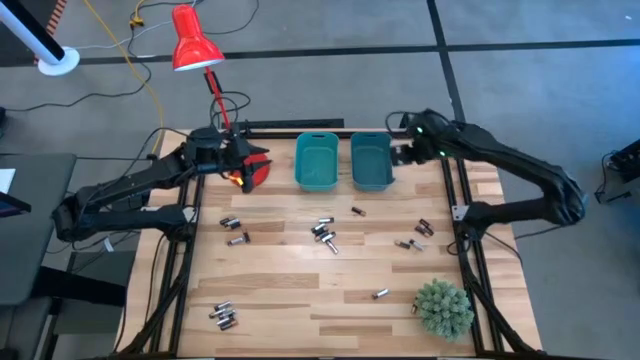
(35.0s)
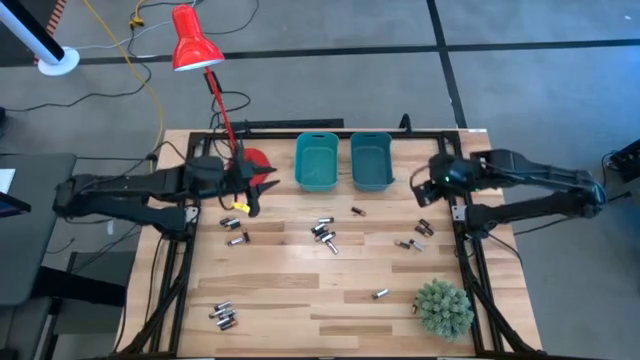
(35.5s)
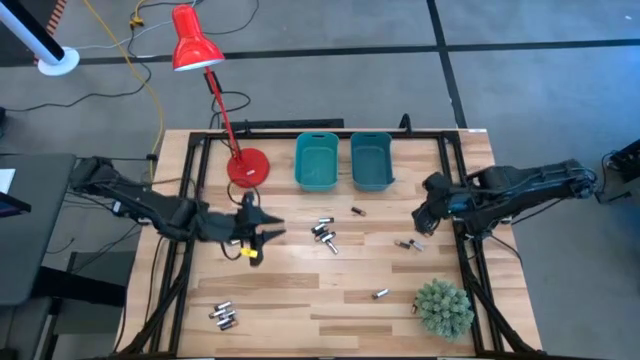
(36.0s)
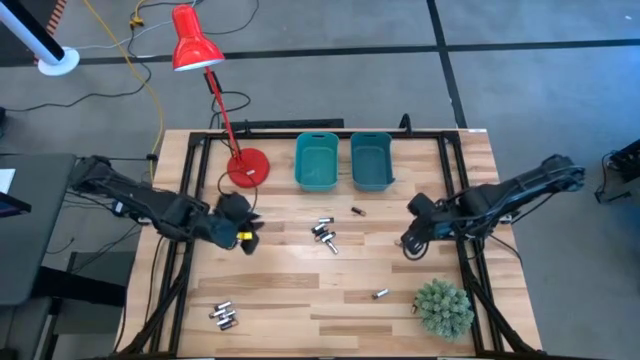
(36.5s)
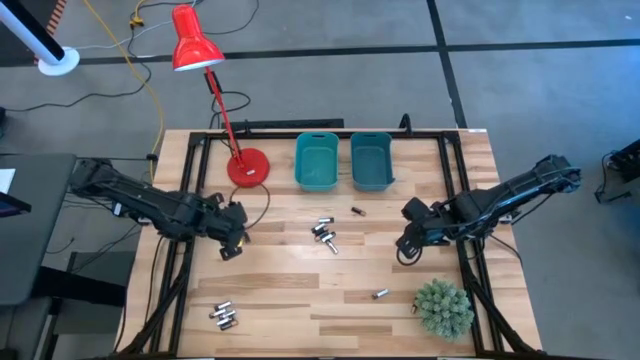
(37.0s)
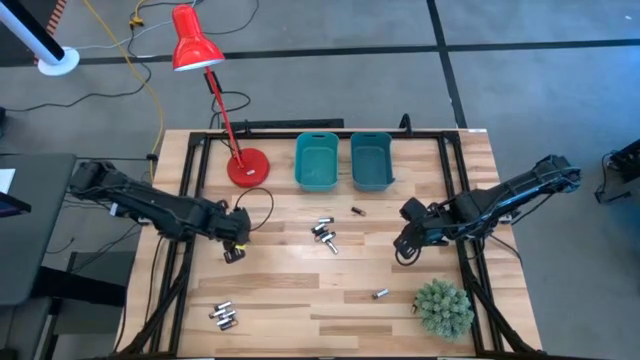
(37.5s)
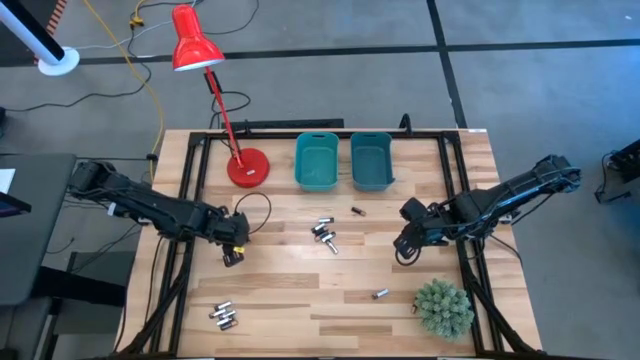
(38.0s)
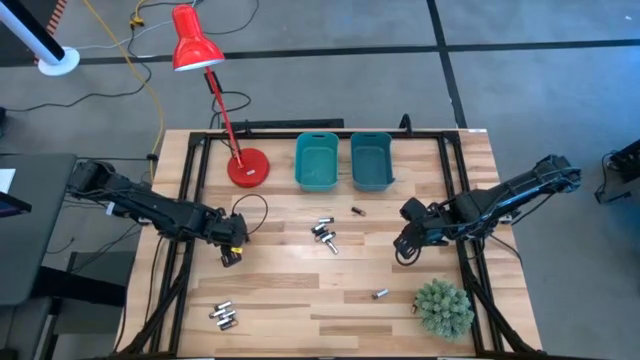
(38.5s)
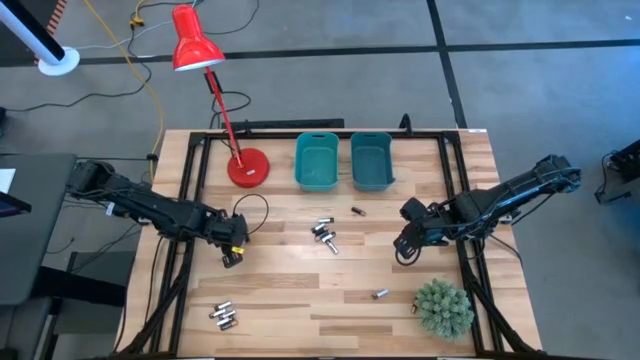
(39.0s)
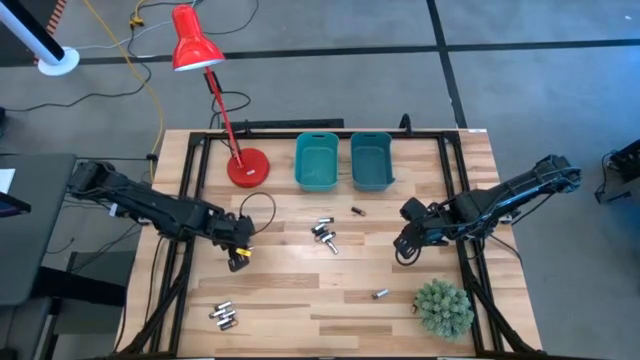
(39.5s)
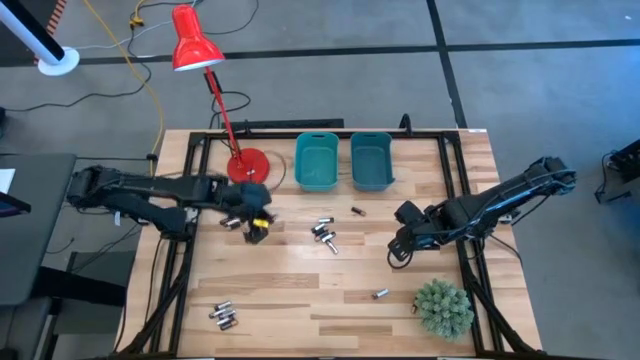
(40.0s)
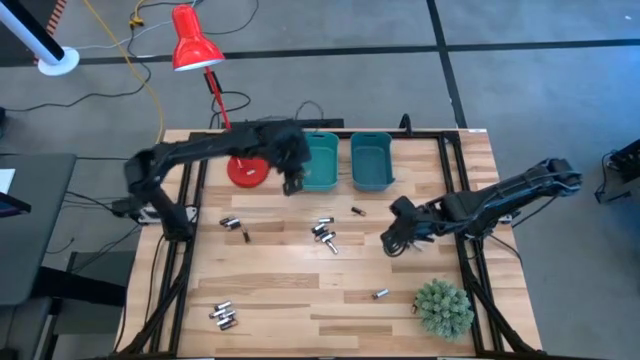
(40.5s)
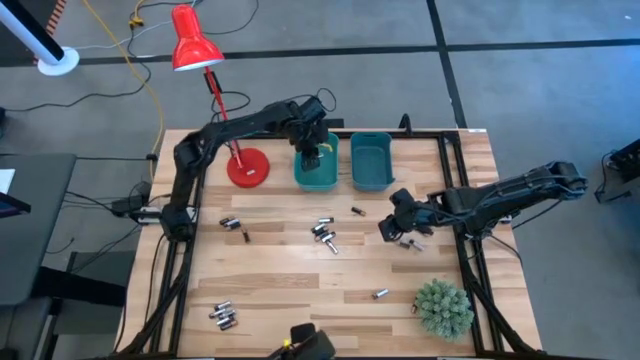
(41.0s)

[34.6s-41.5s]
Task: Sort batteries
Put the silver battery into the green bin

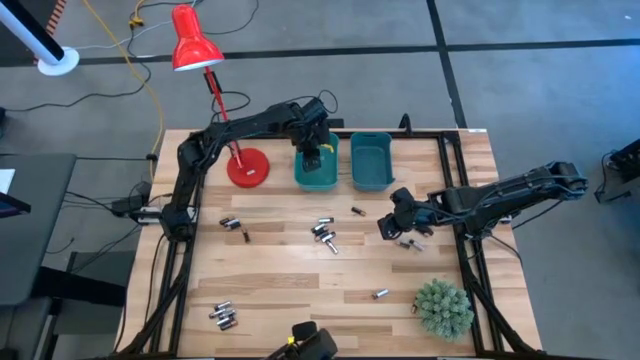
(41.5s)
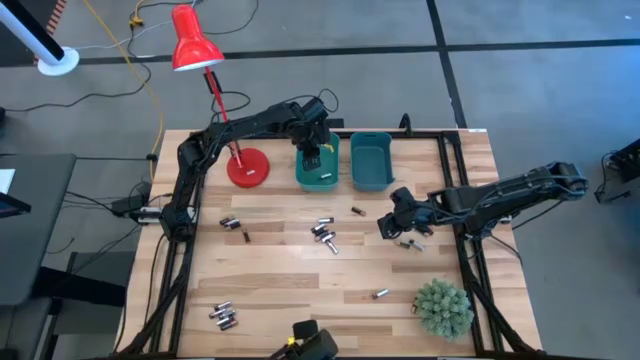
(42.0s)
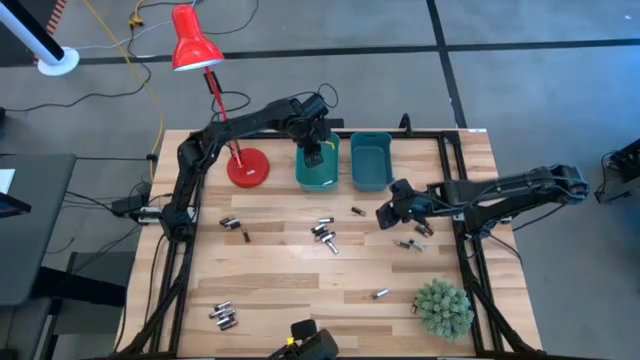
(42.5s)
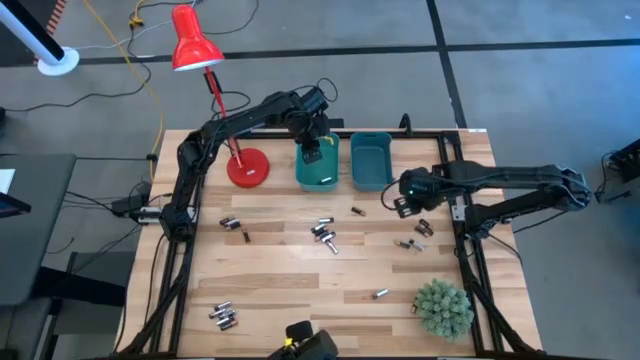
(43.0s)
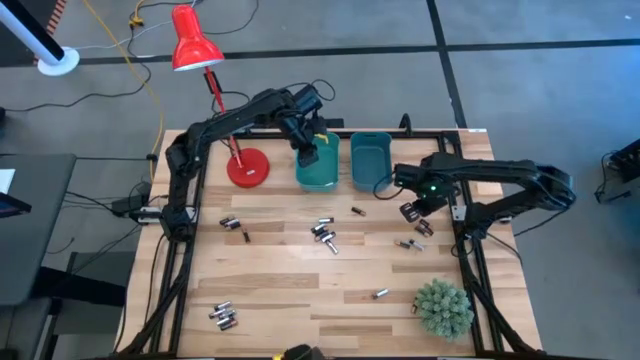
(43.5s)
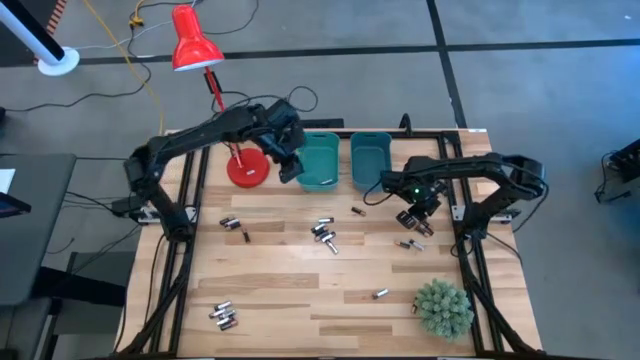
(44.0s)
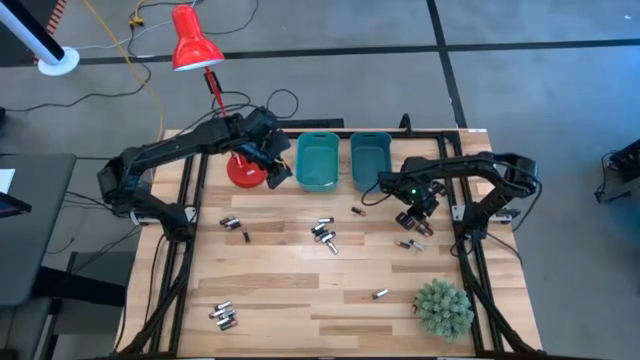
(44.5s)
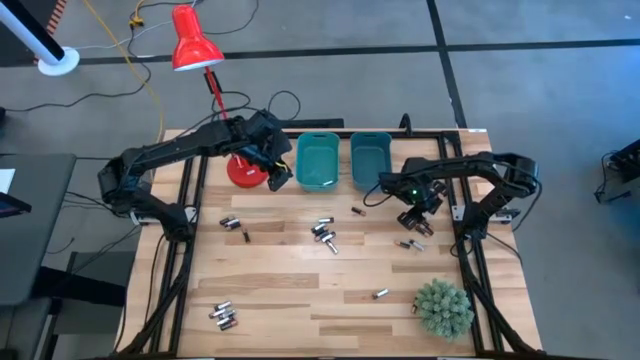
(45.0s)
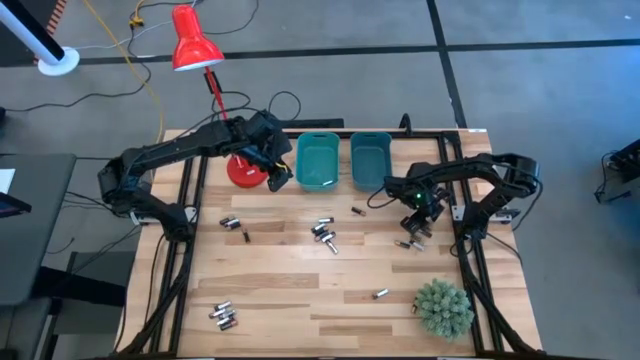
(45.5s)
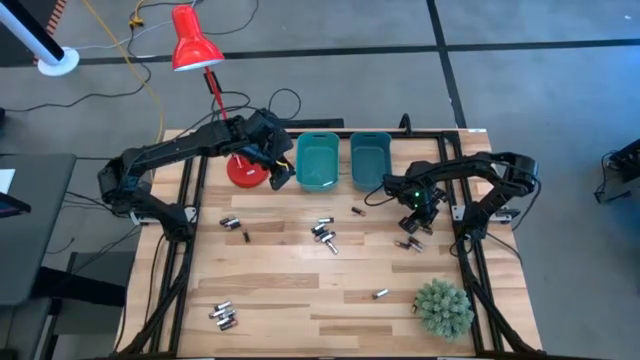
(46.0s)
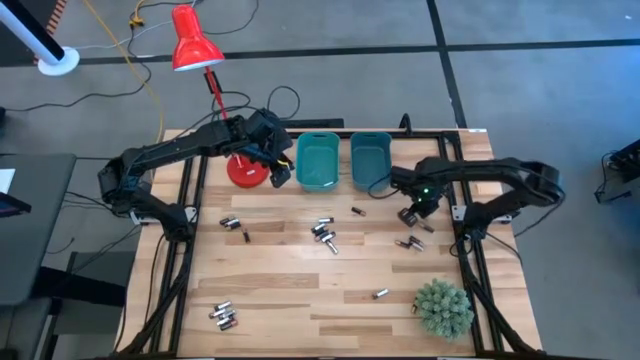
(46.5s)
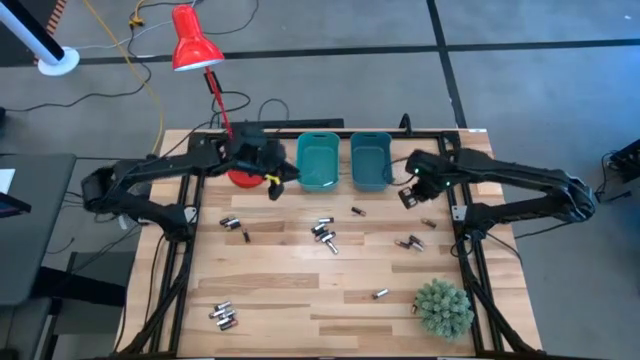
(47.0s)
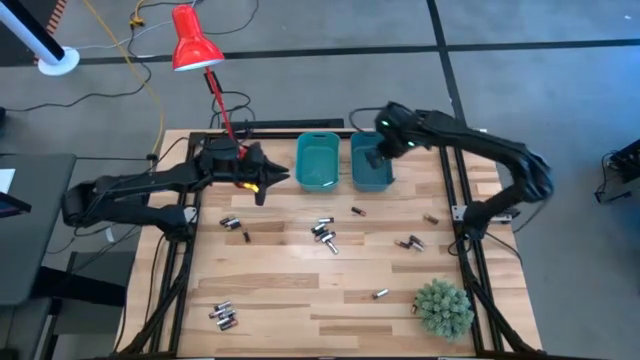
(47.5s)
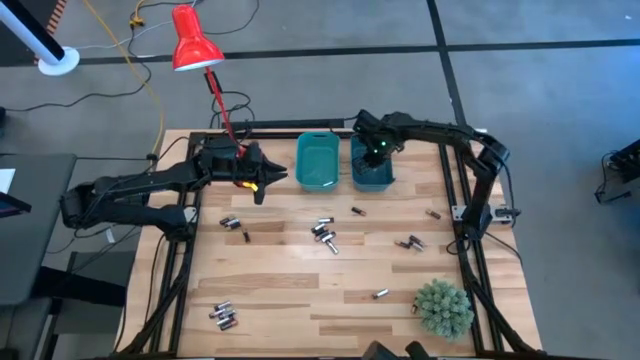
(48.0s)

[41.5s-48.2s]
Put the black battery into the blue bin

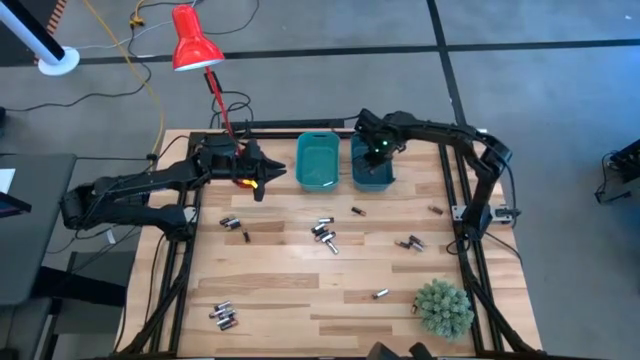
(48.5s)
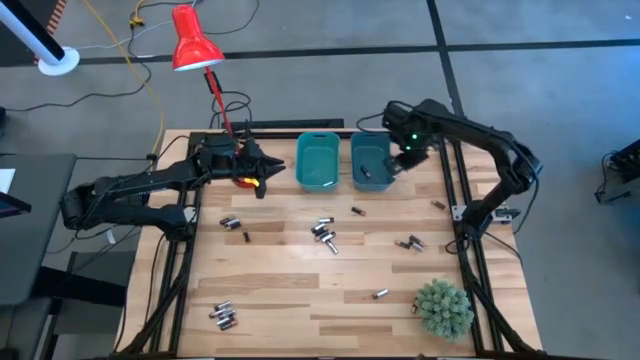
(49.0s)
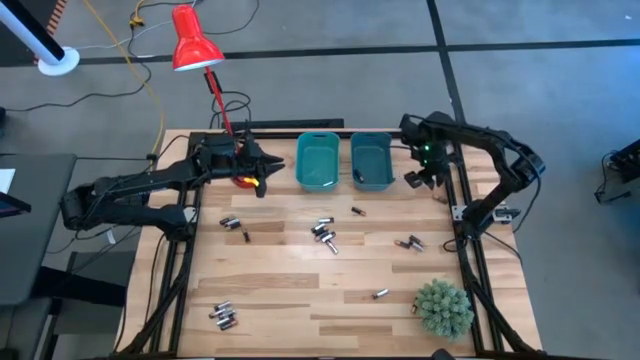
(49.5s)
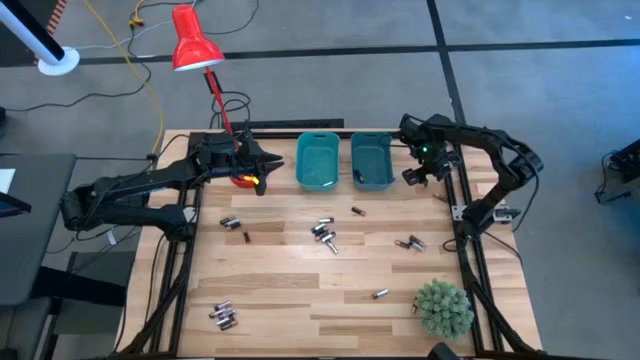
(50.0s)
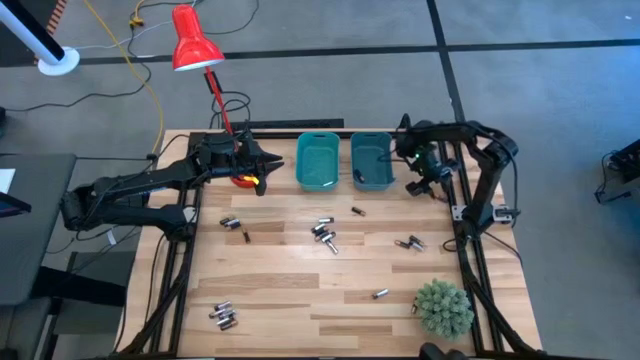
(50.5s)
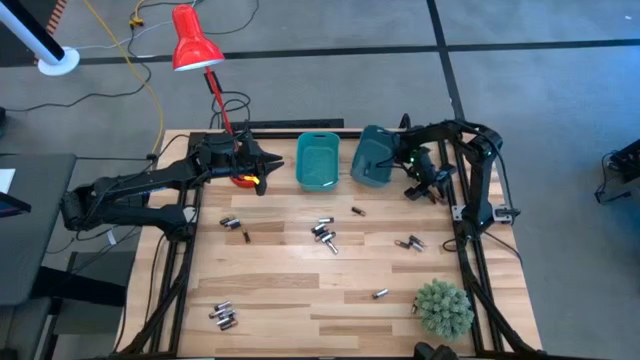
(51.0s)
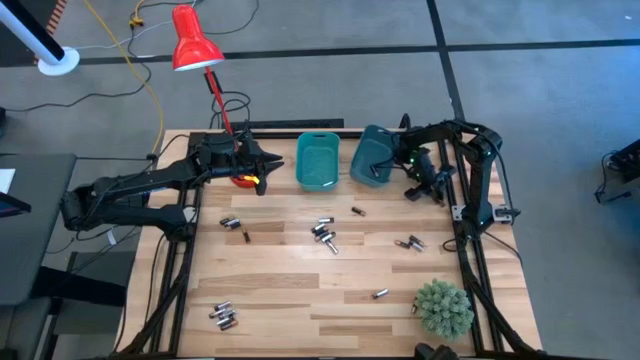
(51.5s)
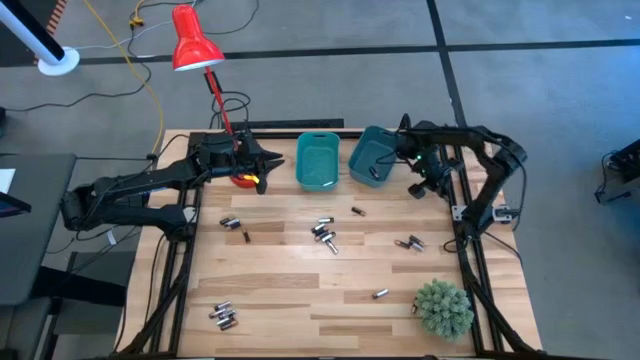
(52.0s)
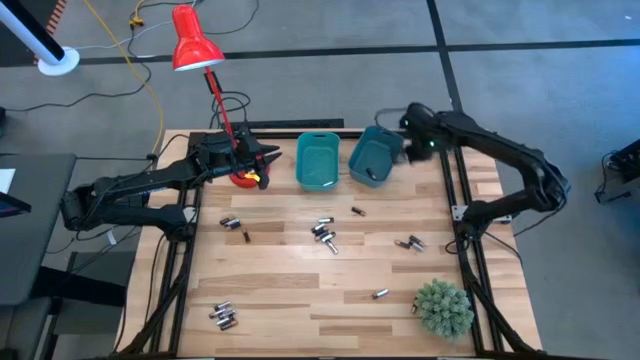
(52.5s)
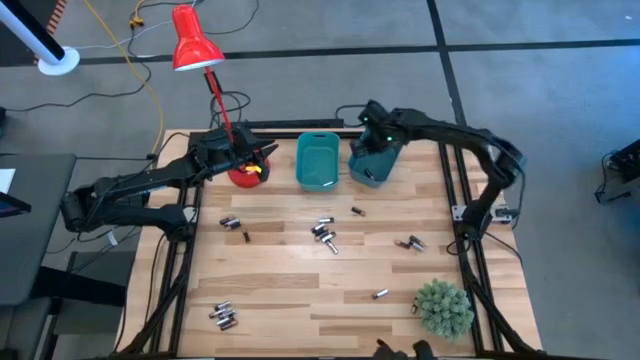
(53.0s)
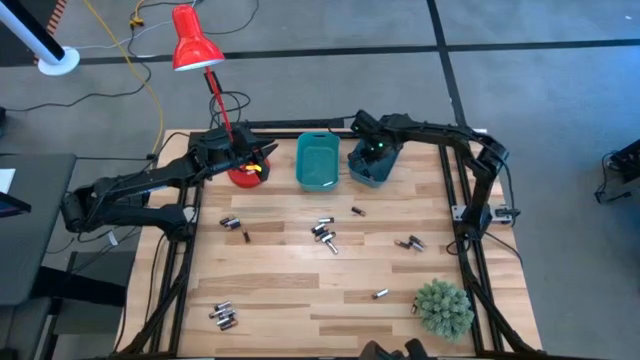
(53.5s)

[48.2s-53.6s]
Put the black battery into the blue bin

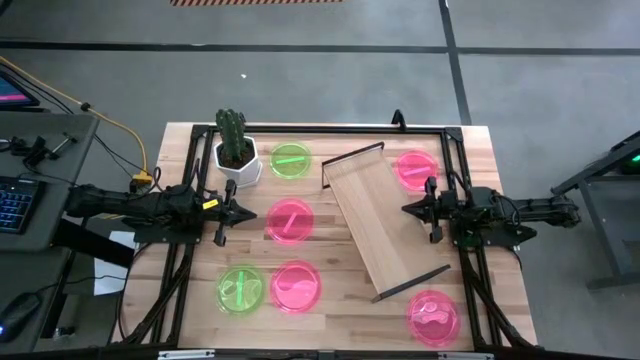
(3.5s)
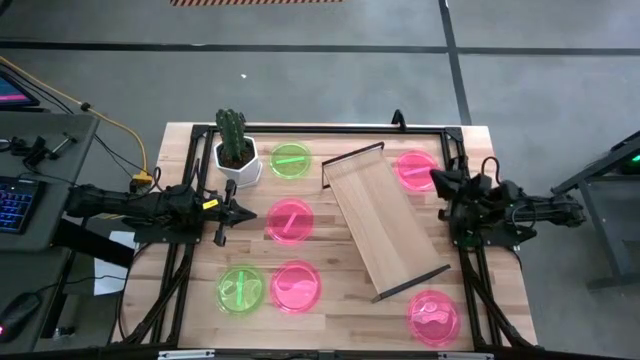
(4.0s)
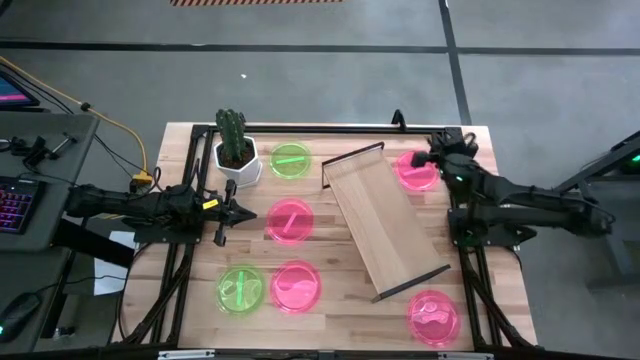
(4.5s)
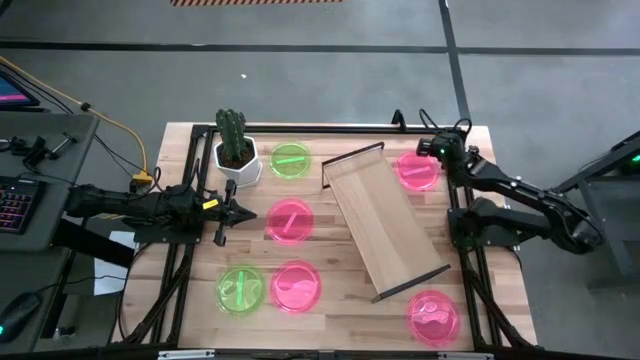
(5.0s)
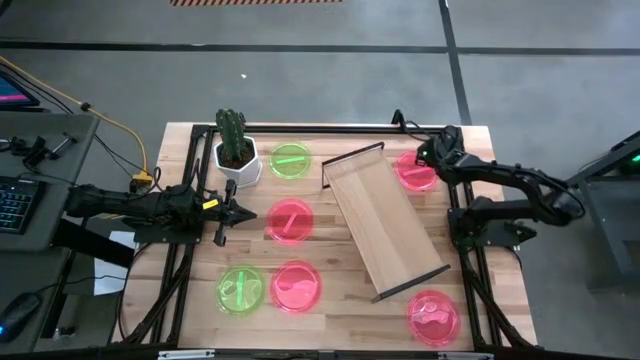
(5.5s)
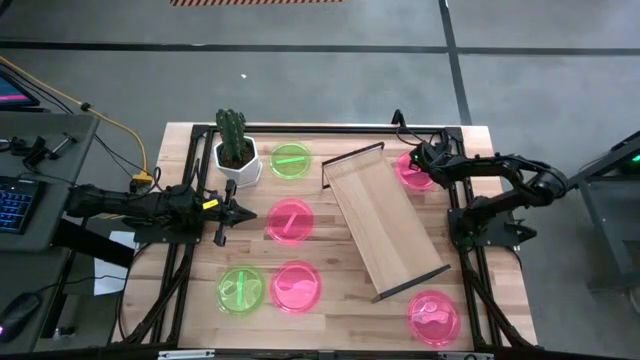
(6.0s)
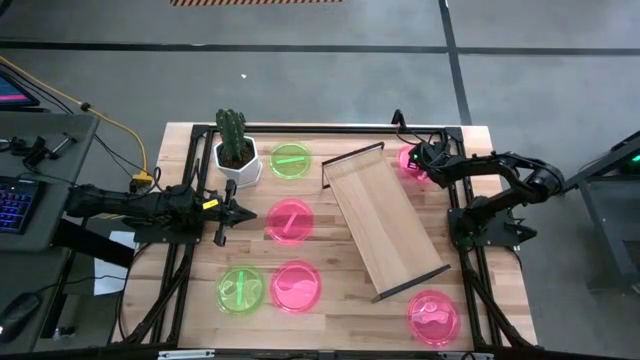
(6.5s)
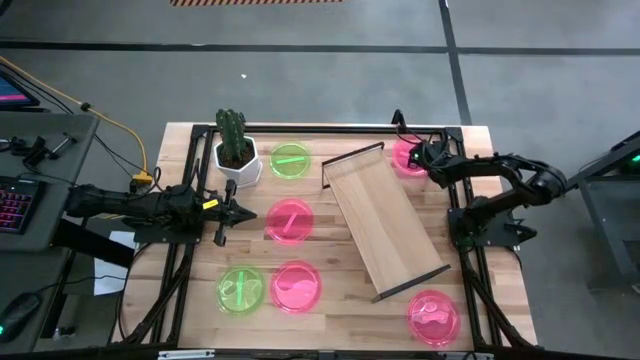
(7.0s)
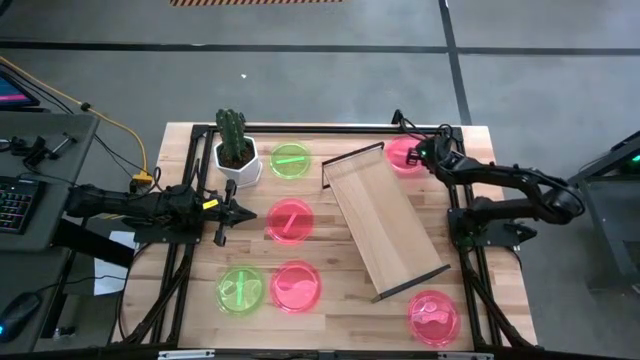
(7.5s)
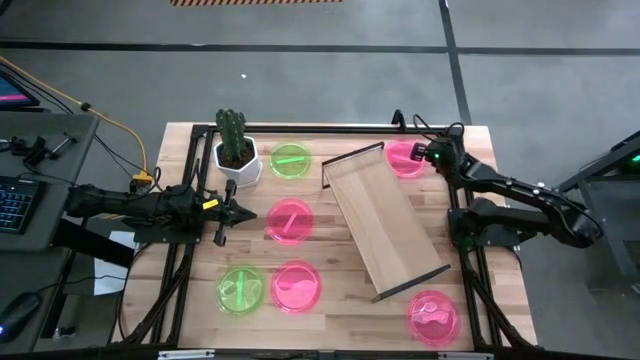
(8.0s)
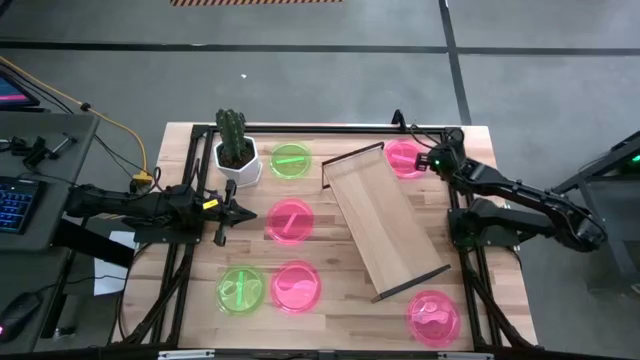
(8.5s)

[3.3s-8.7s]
Task: Place and stack plates onto a shelf
Put the top right pink plate on the shelf
